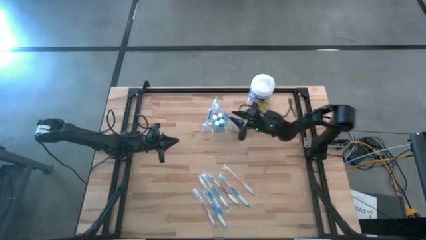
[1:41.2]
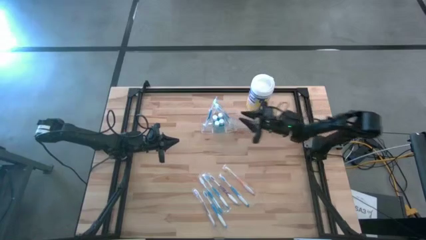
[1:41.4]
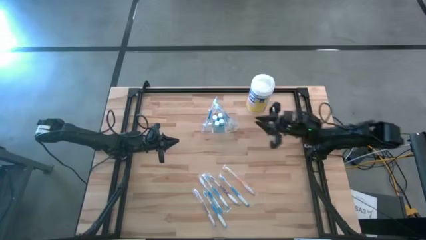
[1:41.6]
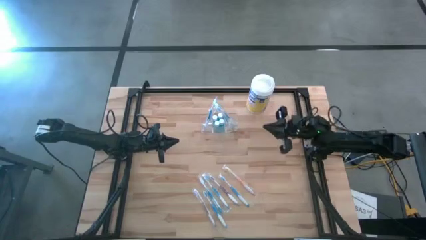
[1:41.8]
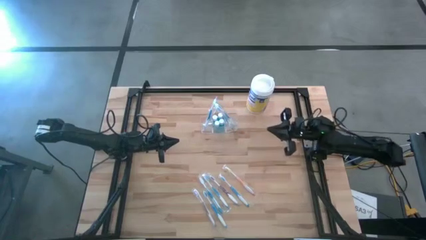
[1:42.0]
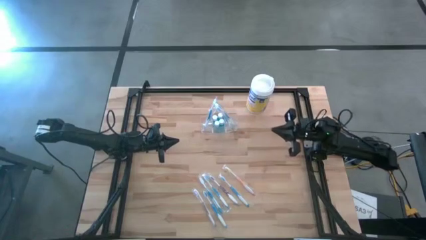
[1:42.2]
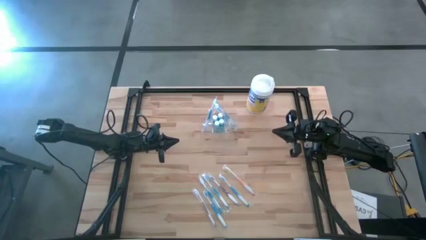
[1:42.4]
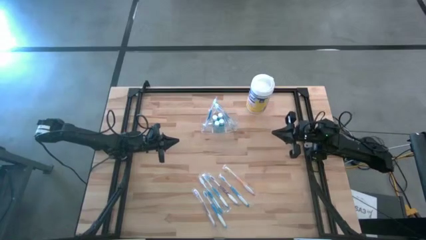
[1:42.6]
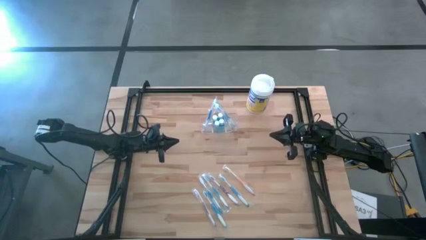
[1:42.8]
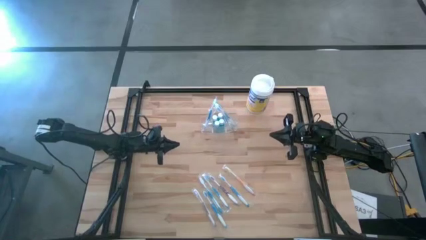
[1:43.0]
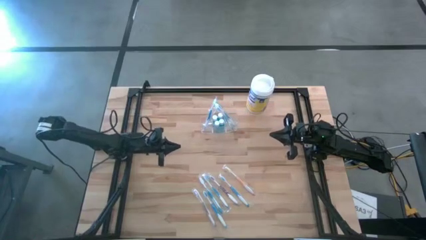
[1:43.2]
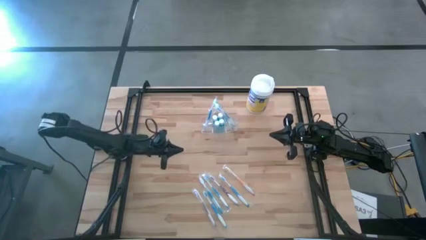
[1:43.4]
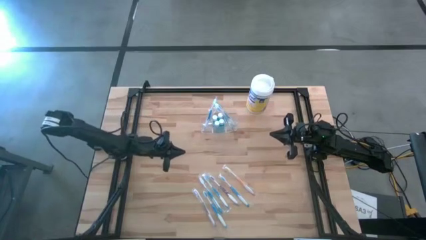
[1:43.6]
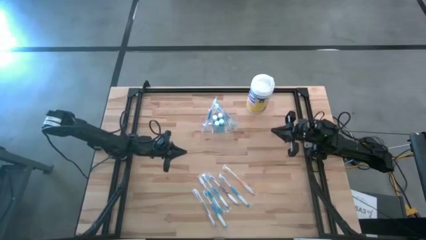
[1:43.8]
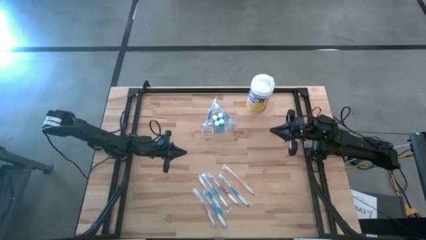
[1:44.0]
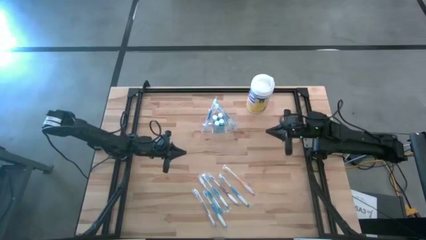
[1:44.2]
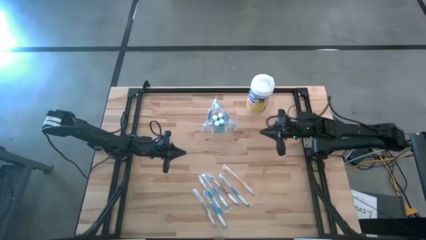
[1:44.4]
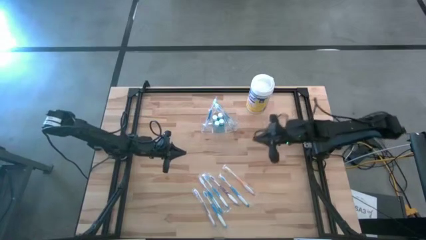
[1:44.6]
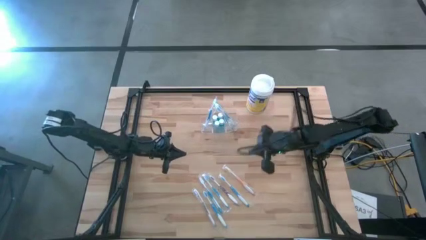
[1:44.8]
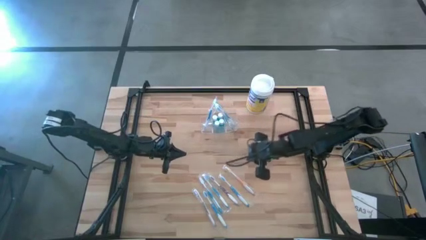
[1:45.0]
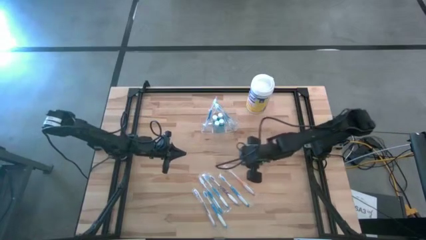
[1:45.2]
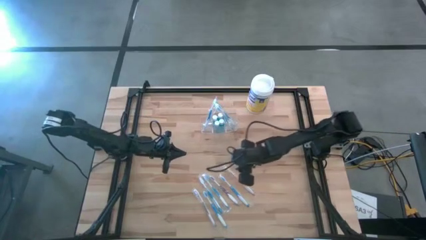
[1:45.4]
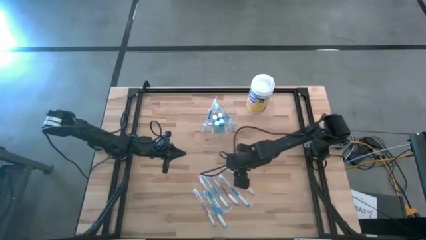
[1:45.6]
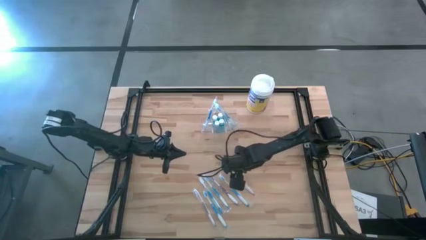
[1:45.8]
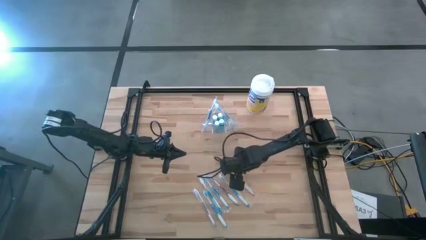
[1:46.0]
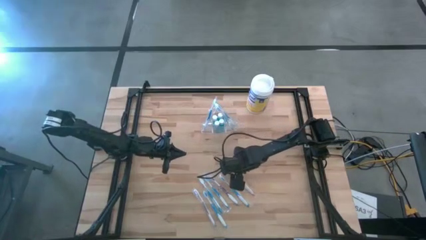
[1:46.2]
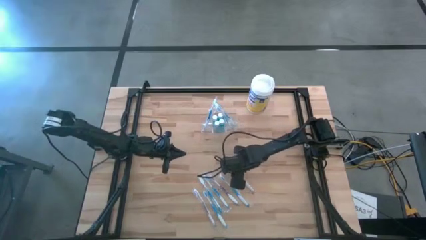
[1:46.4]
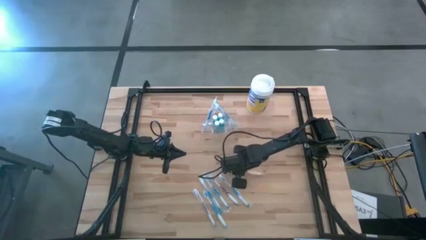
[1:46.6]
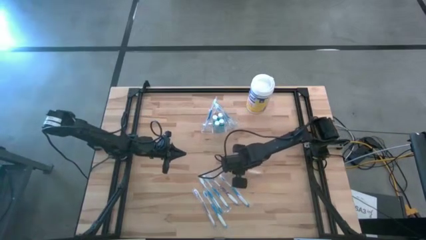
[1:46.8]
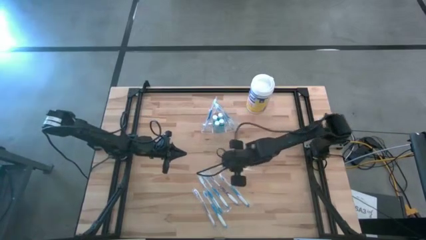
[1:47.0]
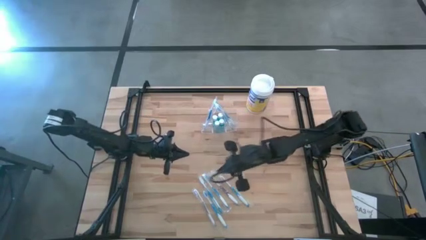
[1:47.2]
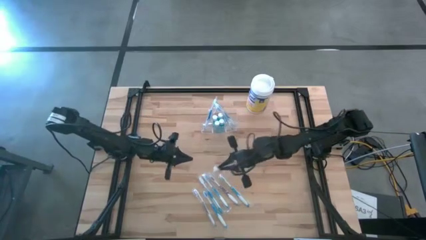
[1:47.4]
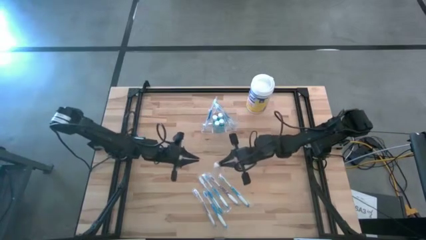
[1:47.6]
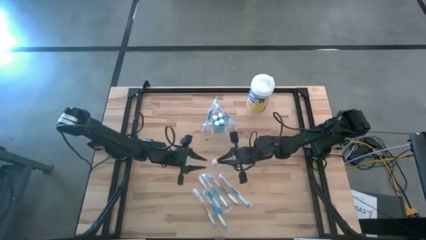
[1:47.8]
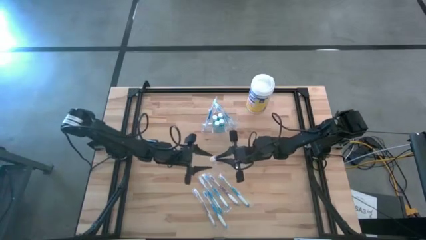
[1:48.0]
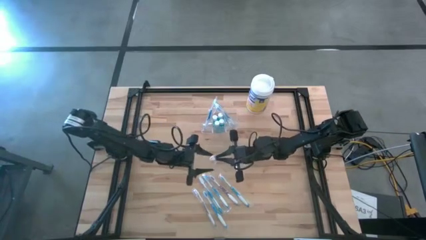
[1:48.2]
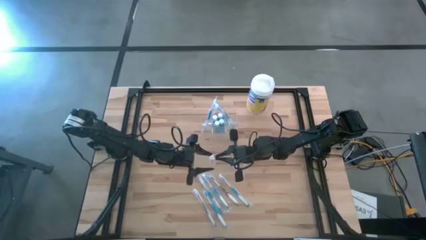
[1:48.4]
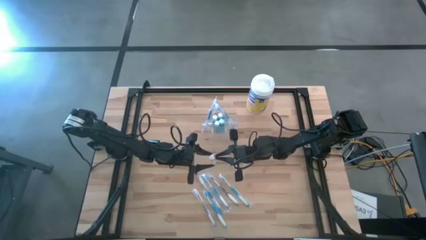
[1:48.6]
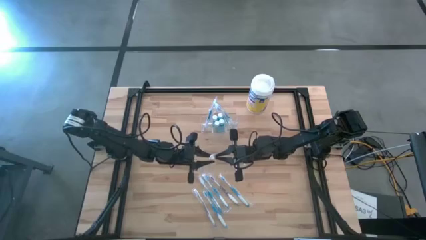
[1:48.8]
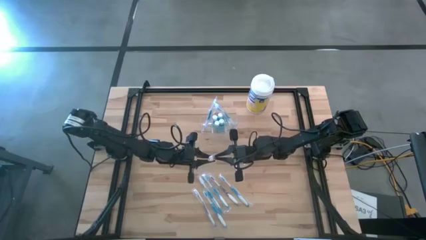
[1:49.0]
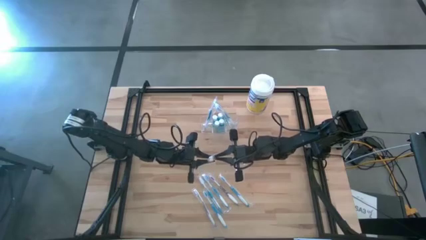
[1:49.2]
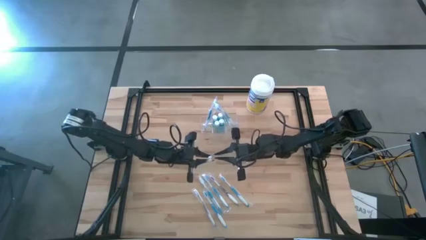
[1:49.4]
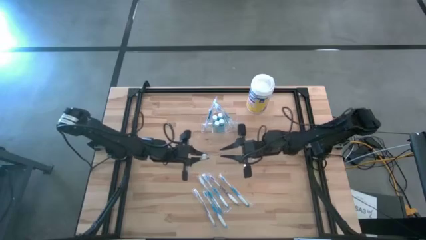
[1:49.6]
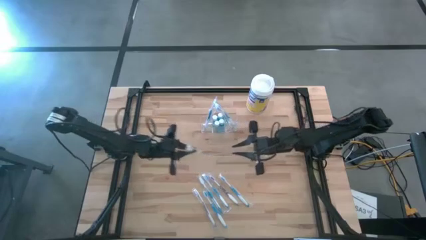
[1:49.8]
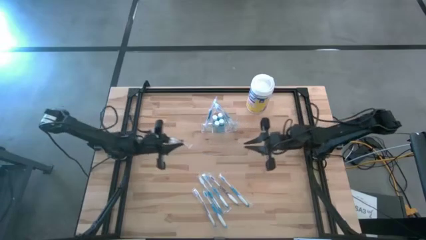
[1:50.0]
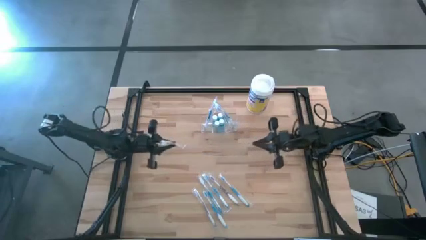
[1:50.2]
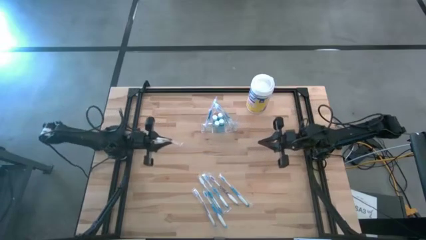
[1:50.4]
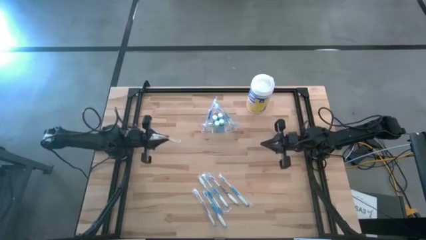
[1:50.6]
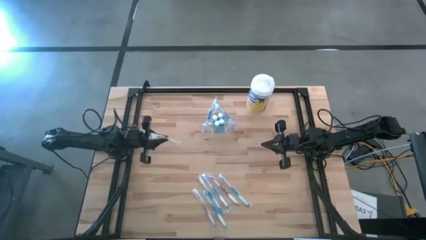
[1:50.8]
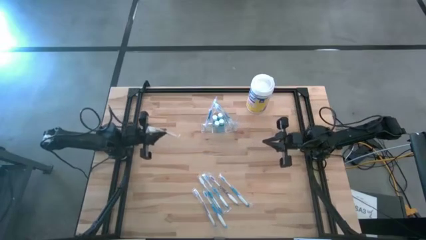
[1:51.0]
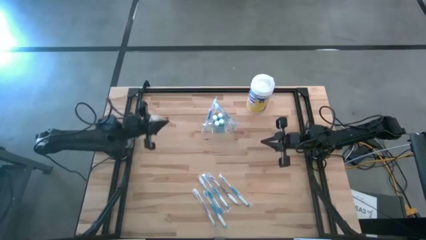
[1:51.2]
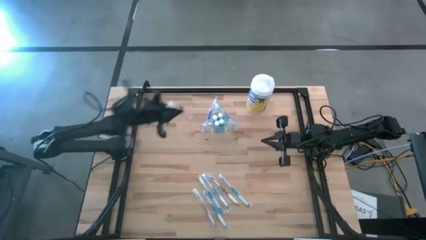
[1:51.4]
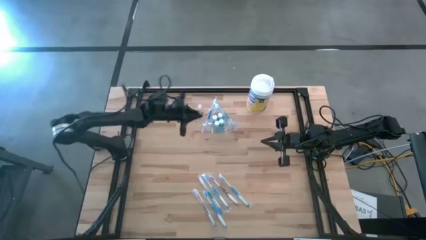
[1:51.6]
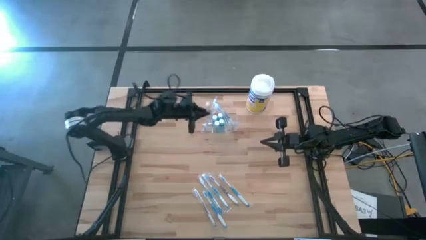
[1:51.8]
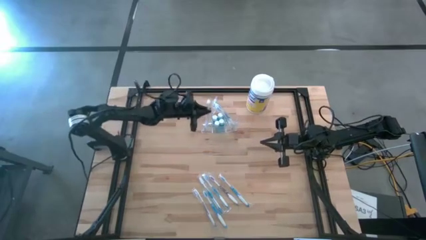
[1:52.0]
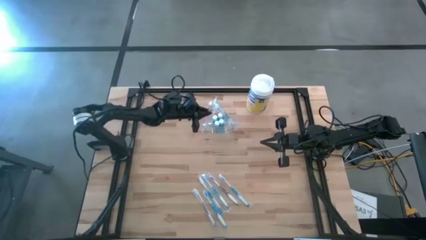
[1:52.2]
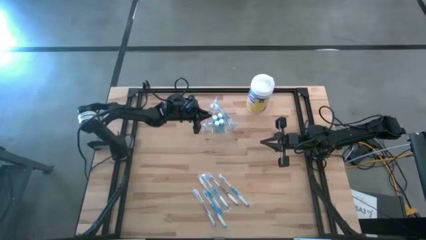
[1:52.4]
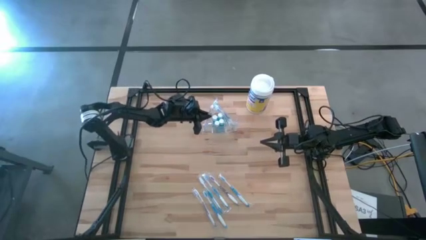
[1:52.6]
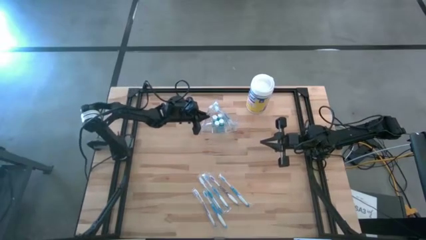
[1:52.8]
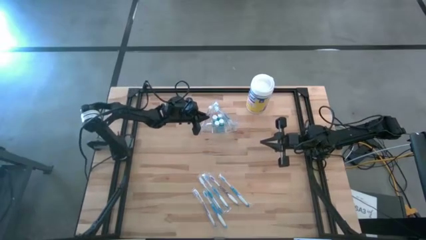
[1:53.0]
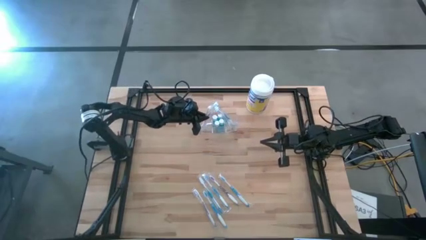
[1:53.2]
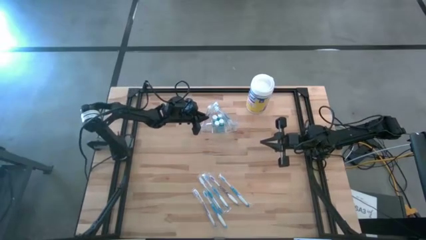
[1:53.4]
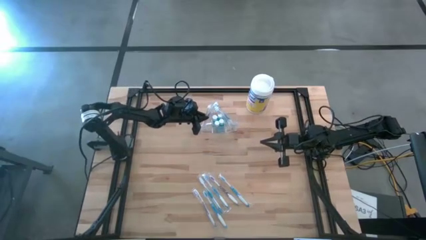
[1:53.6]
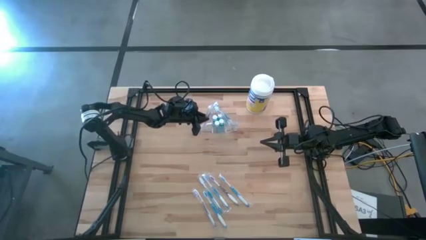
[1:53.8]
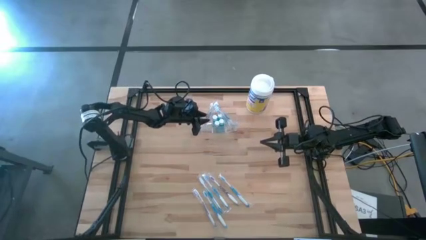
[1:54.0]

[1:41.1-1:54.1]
Task: Pick & Place toothbrushing station
Put the orange toothbrush into the transparent organizer
